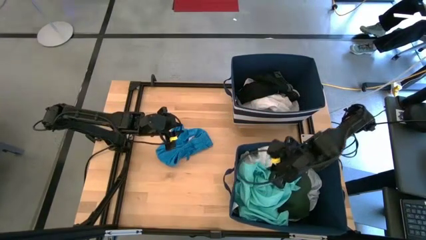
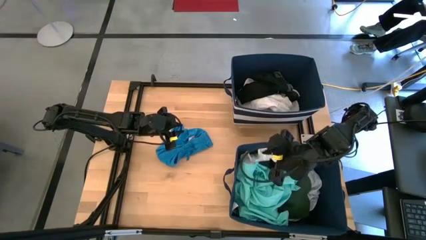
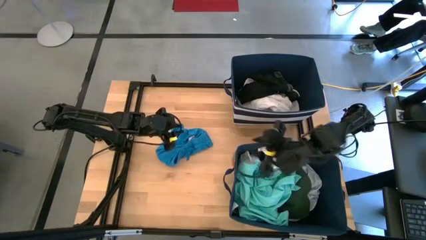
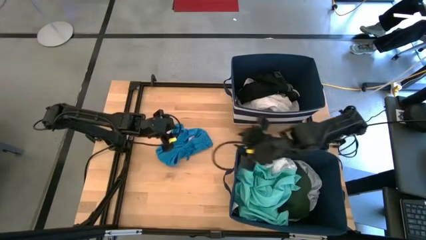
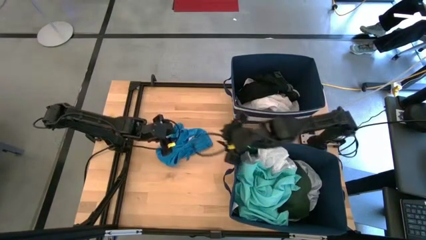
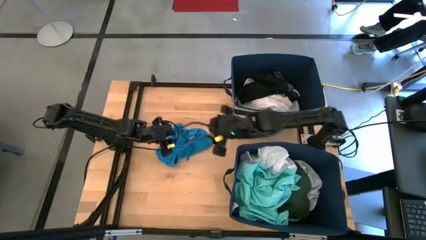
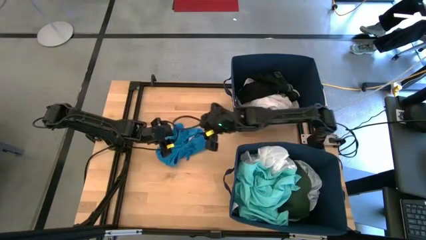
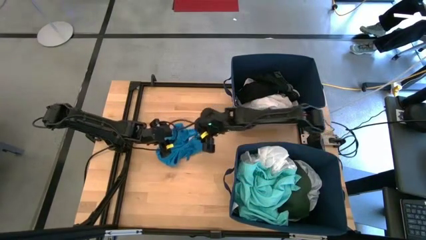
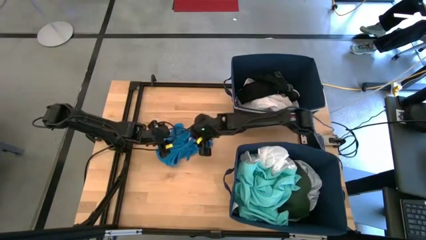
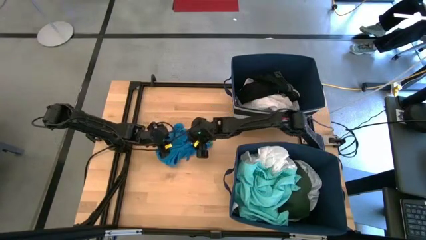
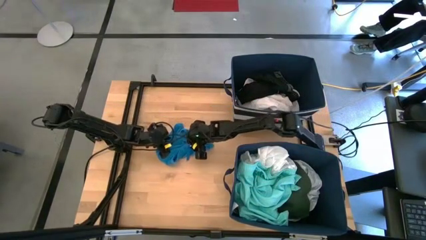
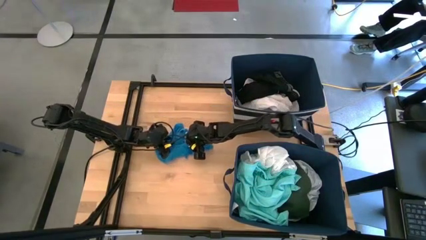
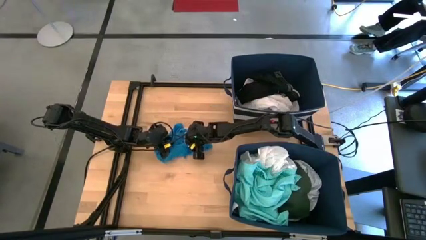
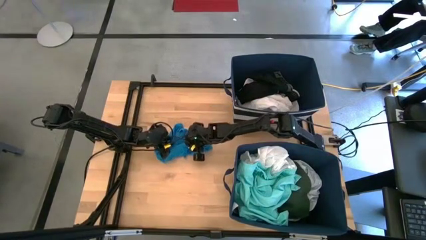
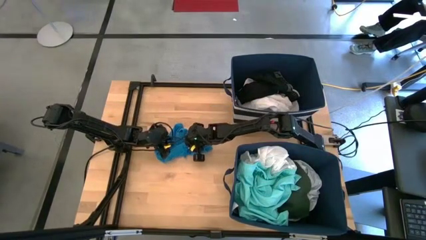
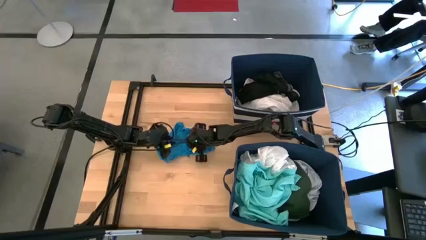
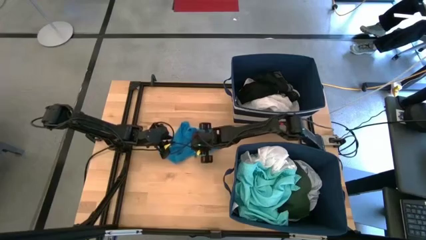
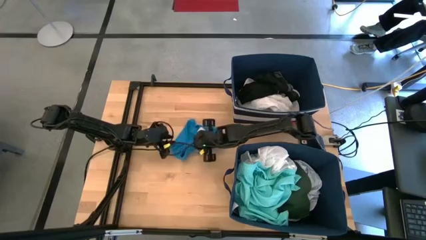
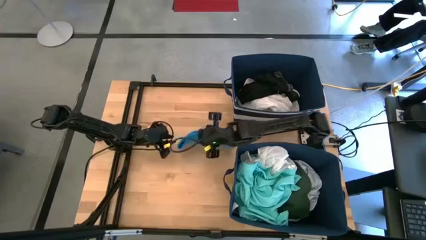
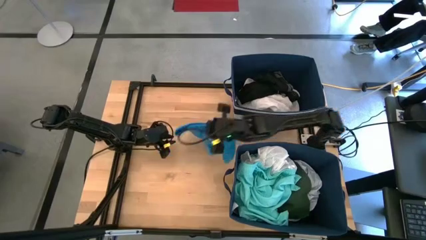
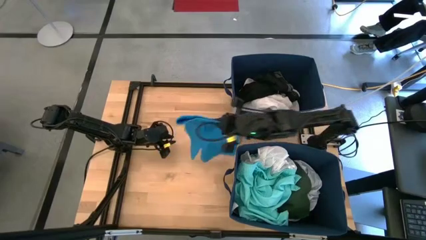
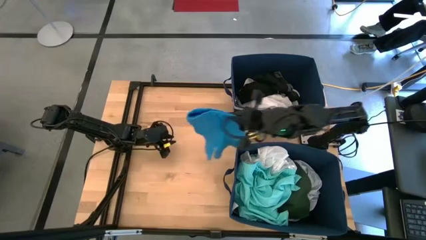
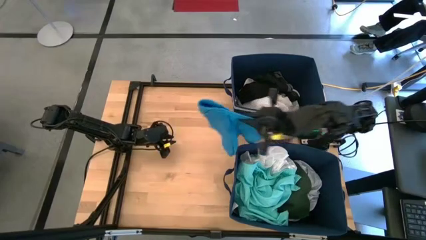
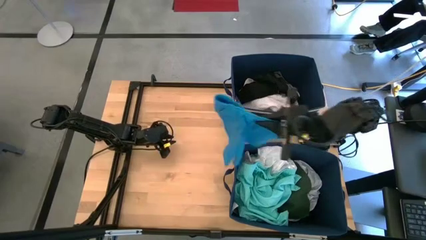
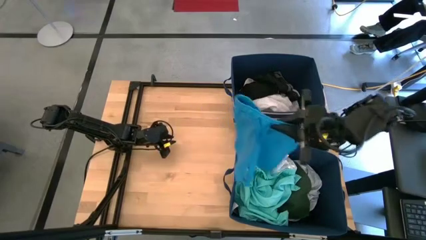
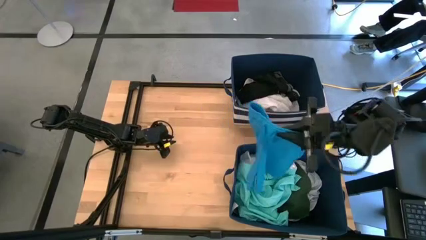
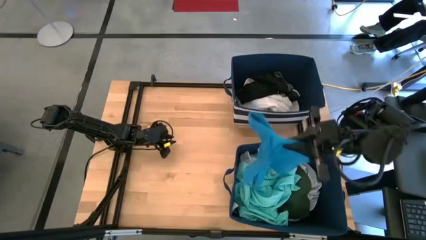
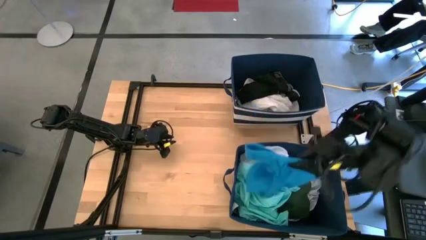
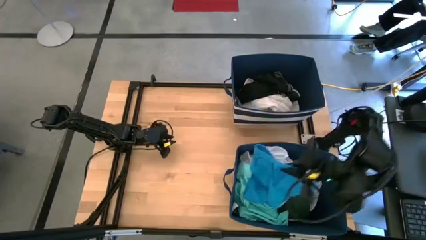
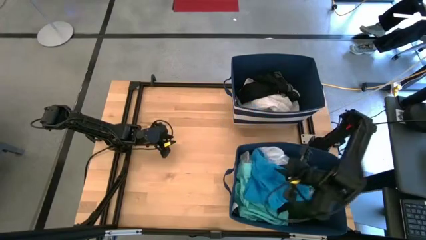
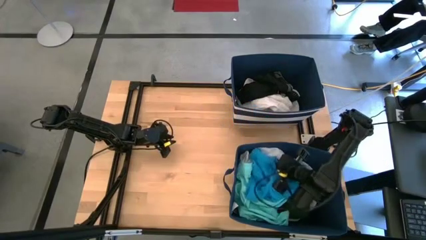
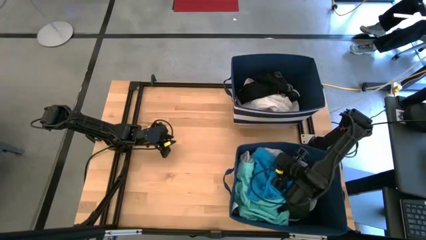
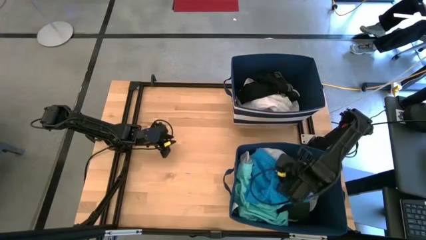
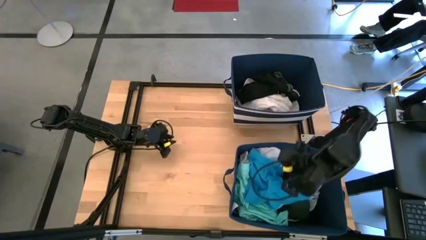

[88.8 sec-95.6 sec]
Task: Sort clothes
Put the blue shorts into the bottom blue laundry organizer

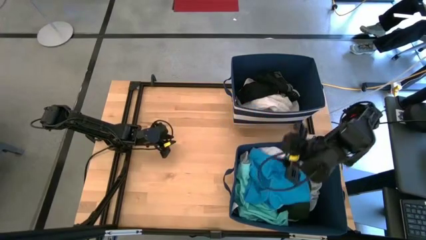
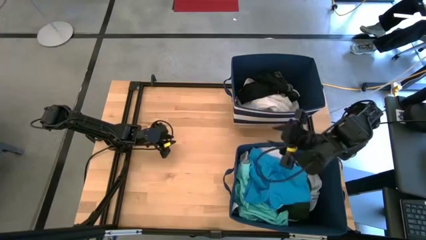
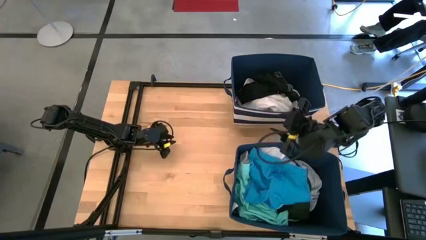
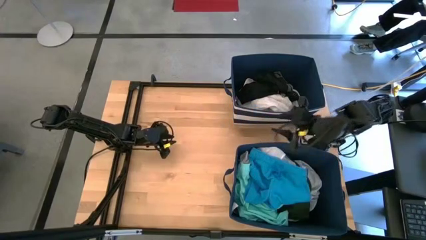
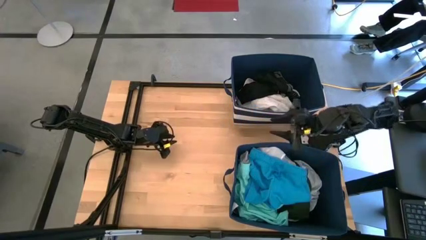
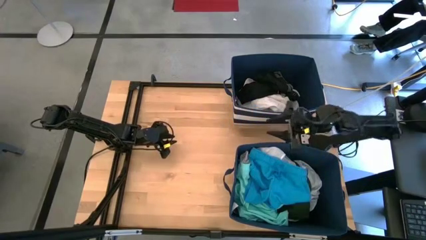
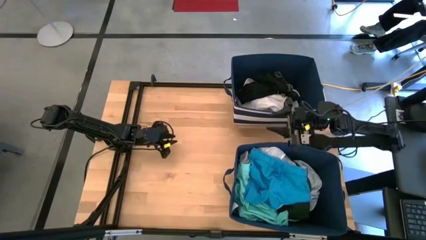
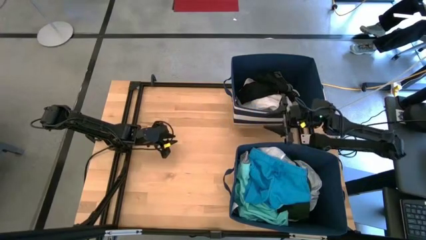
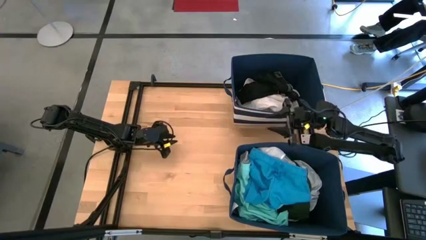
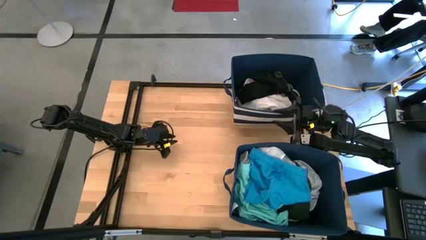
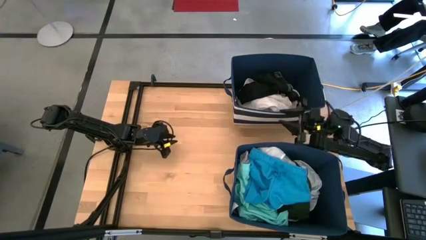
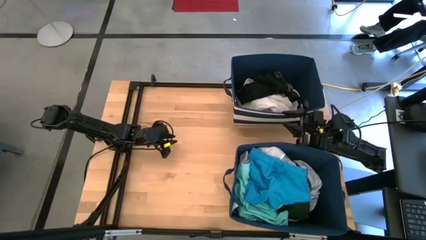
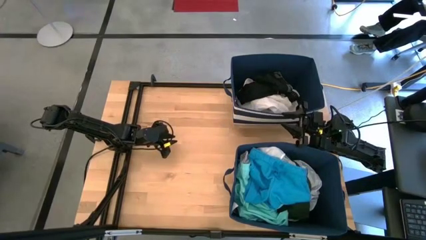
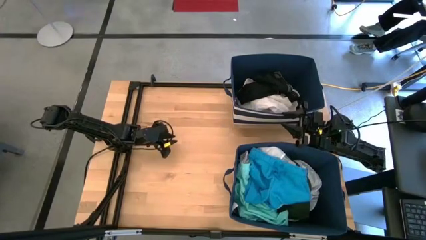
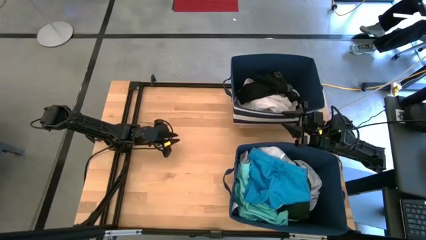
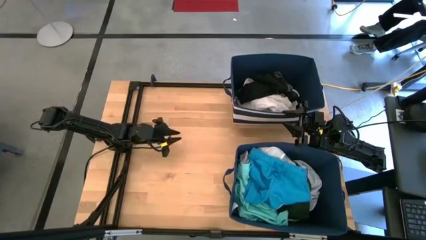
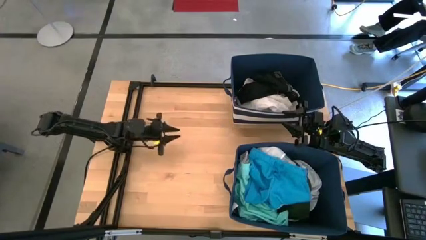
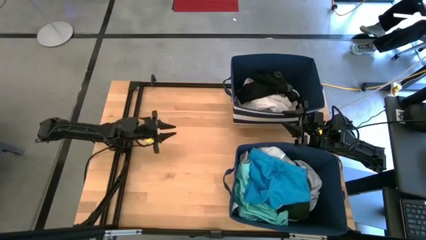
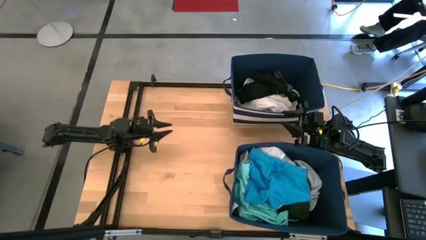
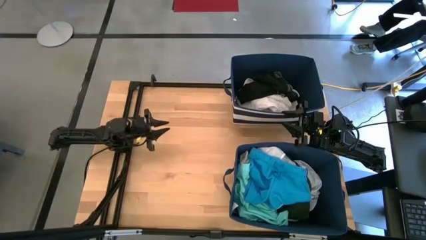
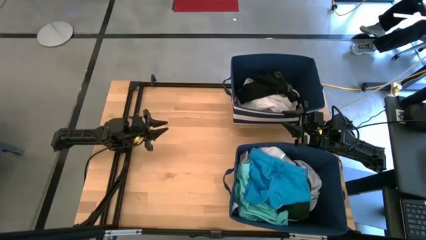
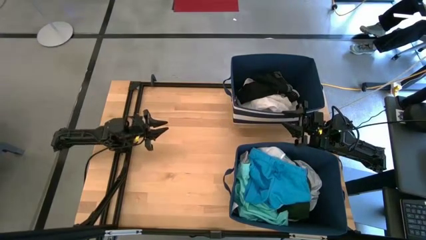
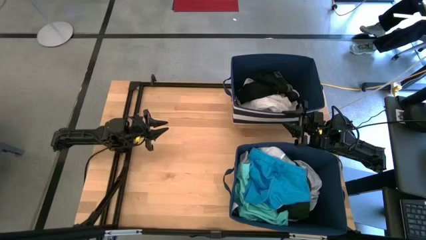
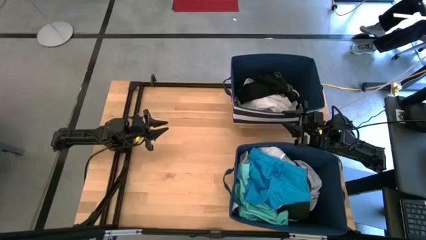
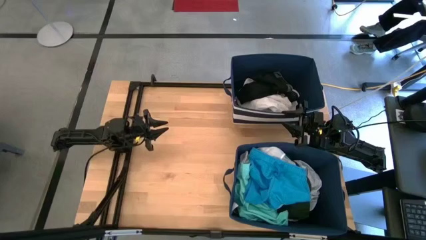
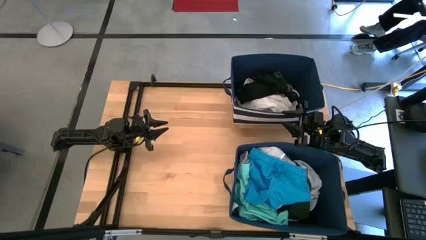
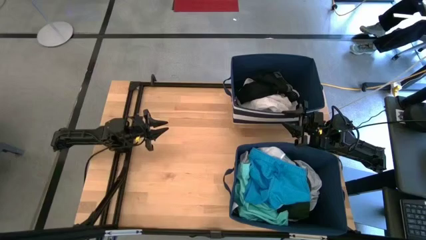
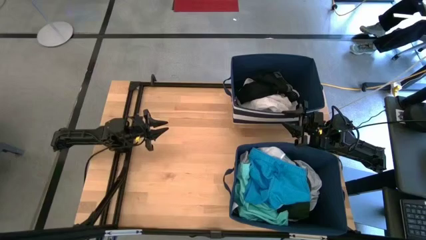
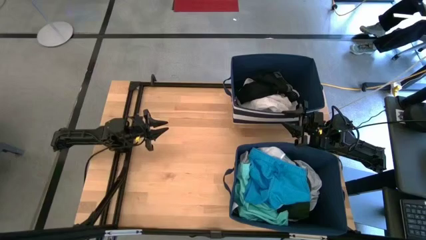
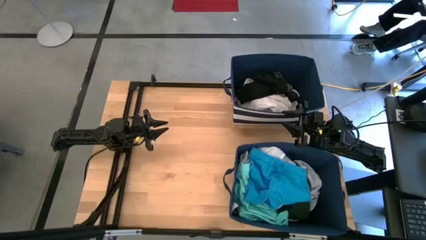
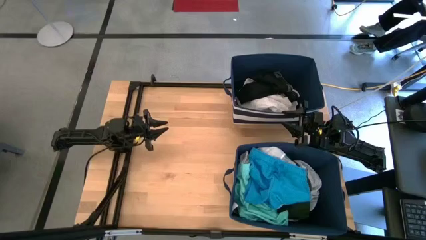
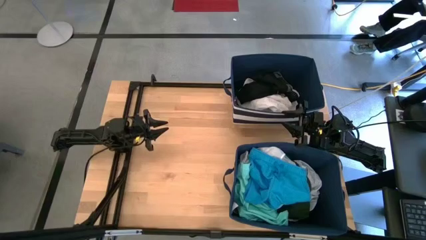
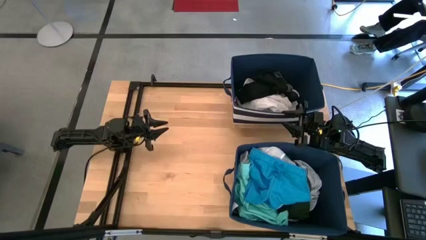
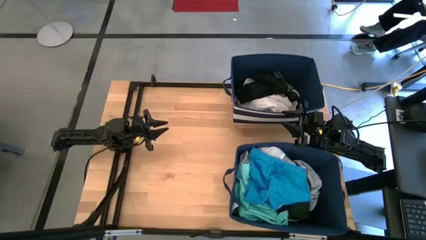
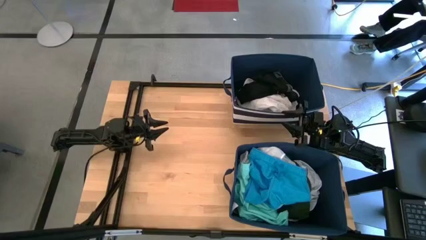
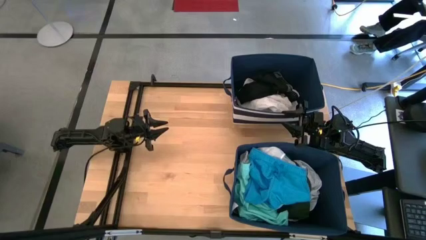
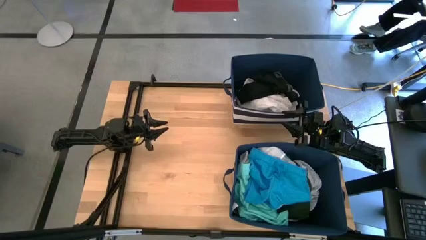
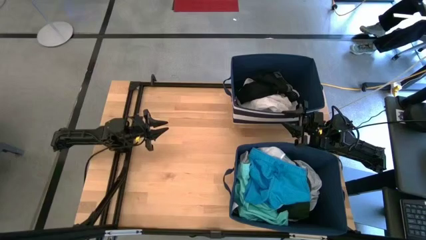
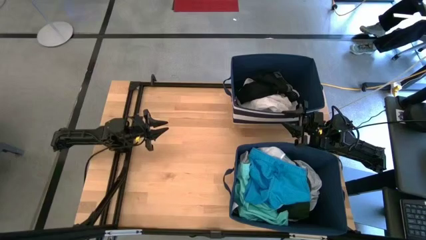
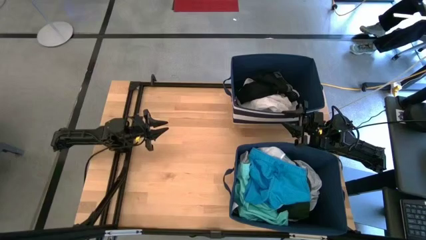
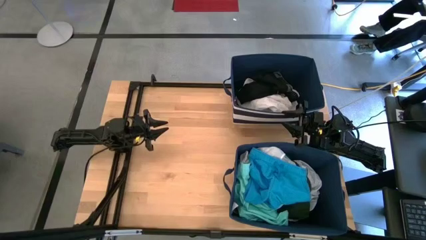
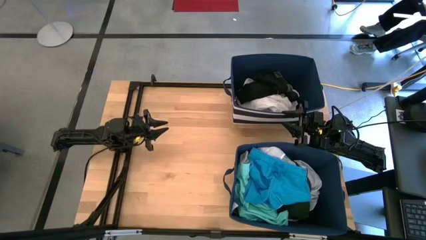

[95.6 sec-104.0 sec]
Return to Home Position
